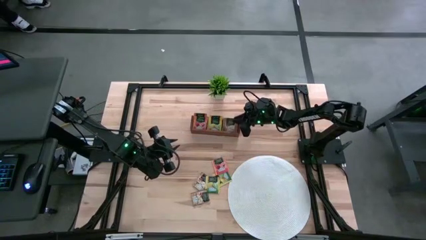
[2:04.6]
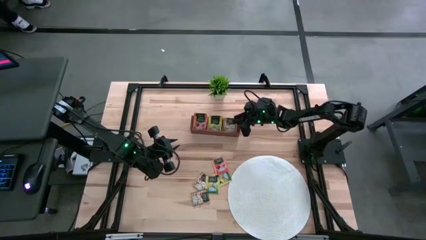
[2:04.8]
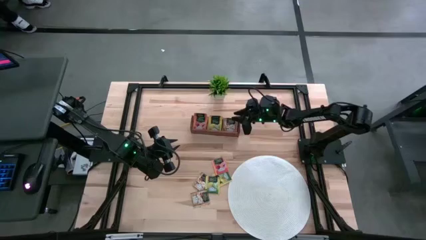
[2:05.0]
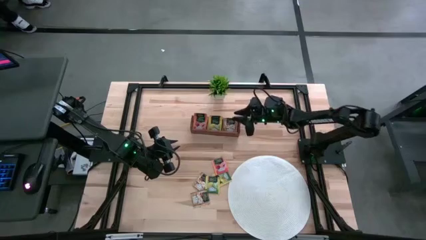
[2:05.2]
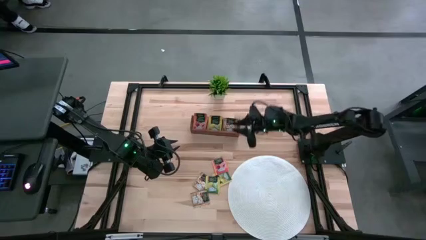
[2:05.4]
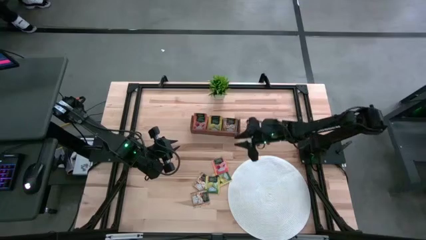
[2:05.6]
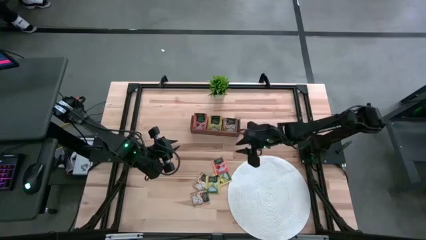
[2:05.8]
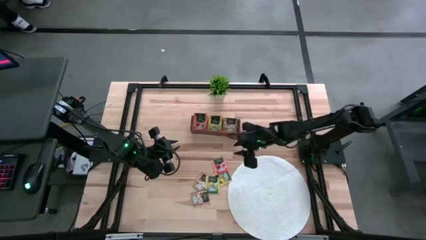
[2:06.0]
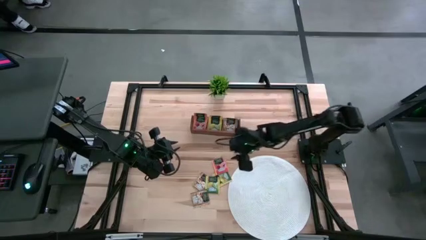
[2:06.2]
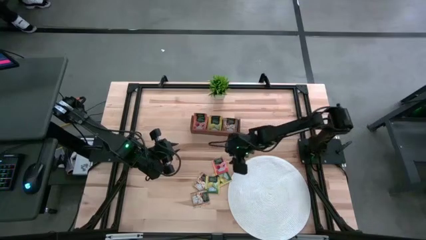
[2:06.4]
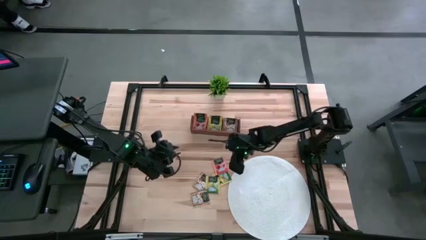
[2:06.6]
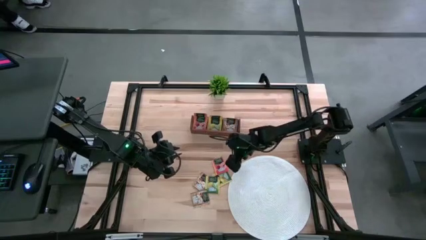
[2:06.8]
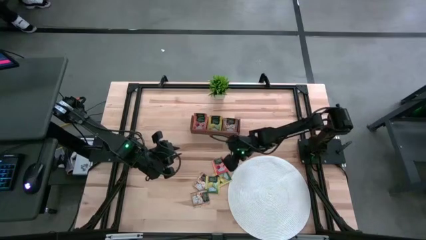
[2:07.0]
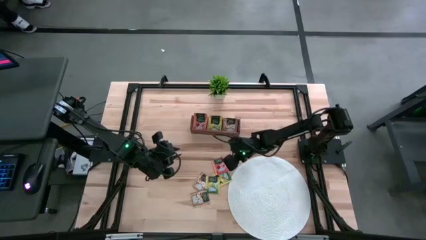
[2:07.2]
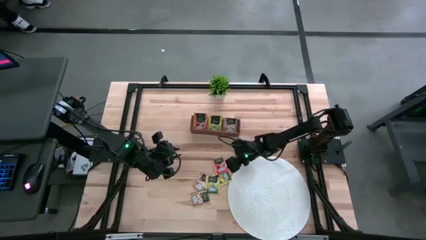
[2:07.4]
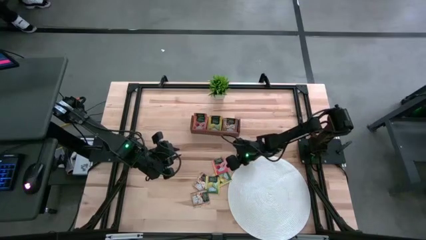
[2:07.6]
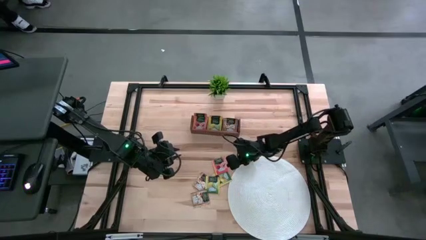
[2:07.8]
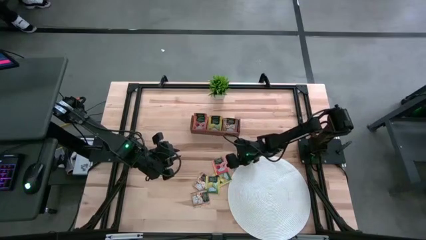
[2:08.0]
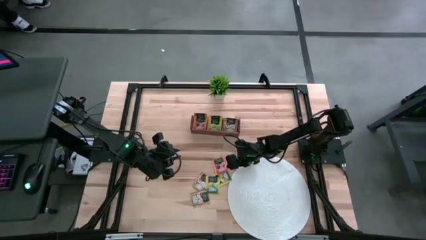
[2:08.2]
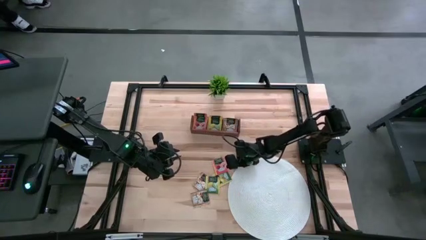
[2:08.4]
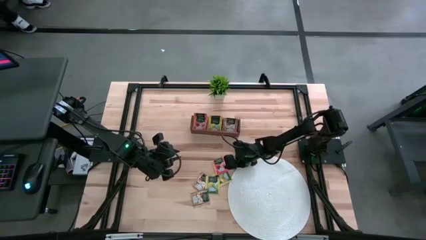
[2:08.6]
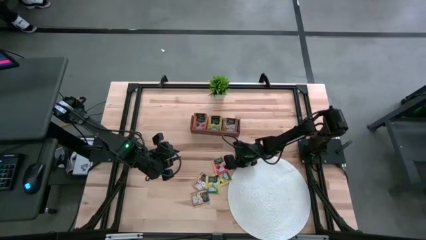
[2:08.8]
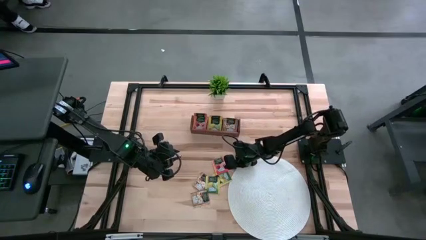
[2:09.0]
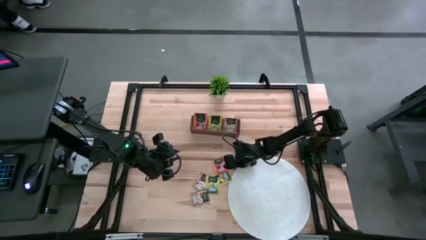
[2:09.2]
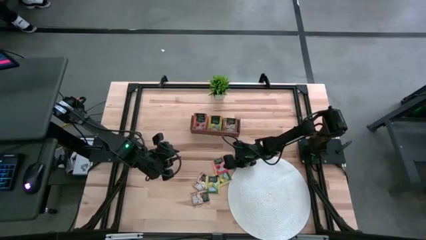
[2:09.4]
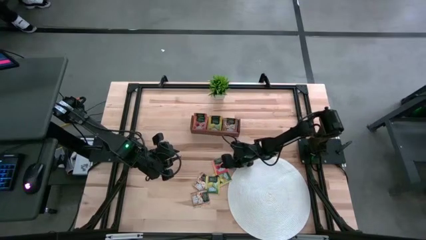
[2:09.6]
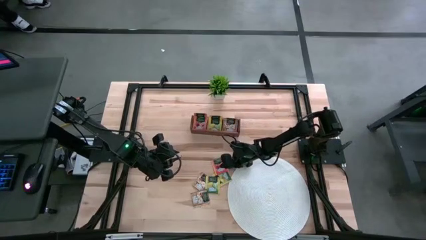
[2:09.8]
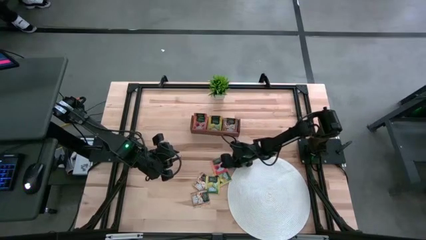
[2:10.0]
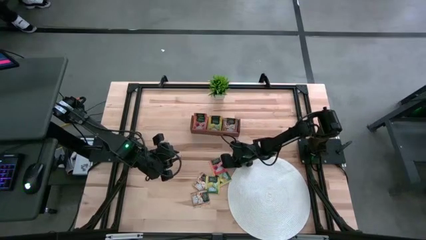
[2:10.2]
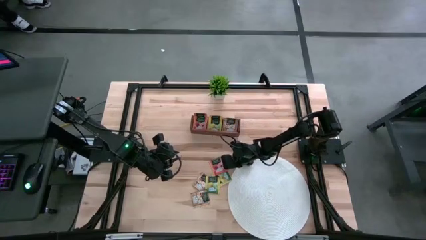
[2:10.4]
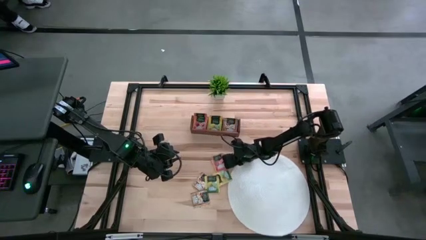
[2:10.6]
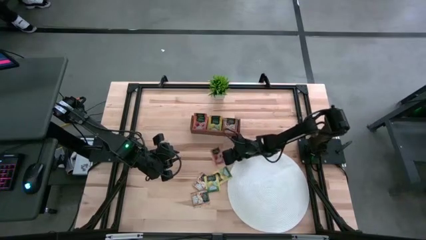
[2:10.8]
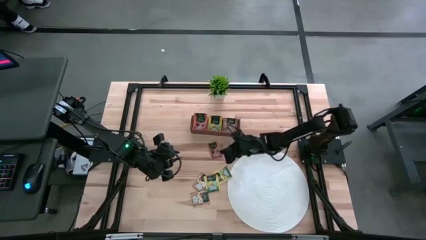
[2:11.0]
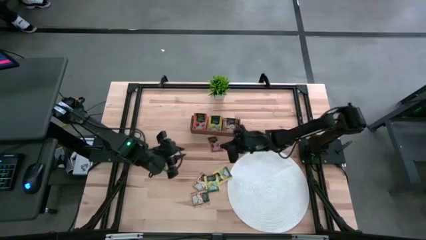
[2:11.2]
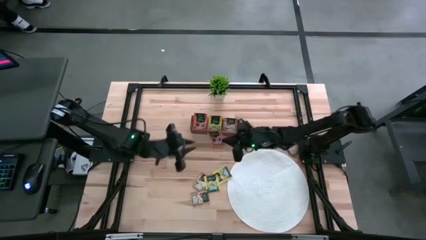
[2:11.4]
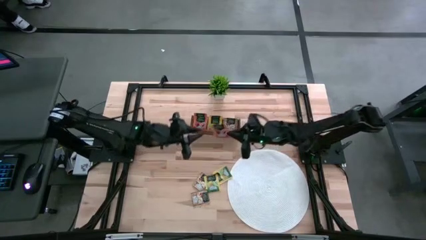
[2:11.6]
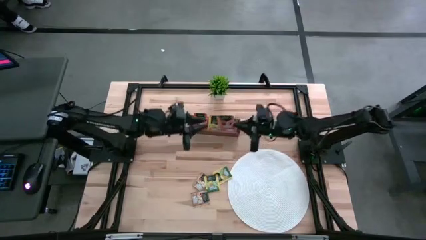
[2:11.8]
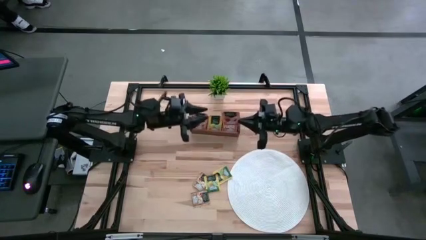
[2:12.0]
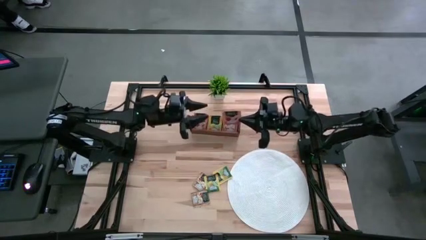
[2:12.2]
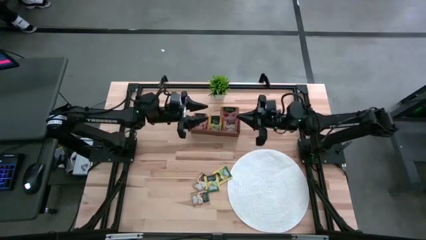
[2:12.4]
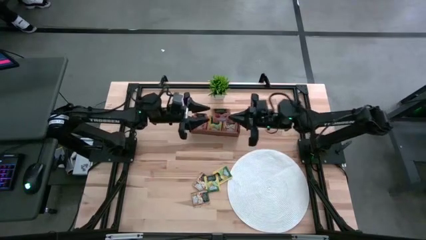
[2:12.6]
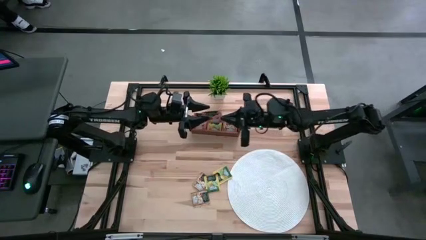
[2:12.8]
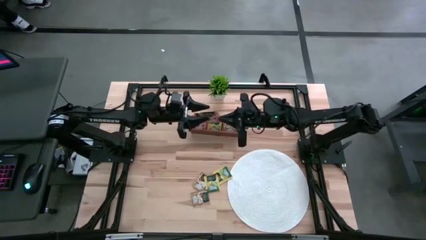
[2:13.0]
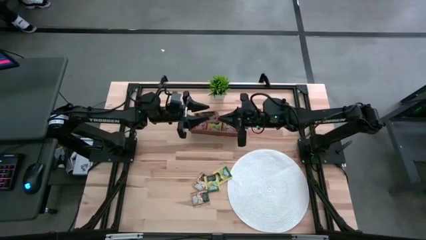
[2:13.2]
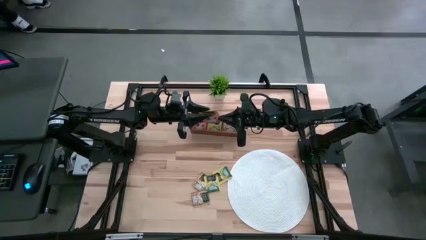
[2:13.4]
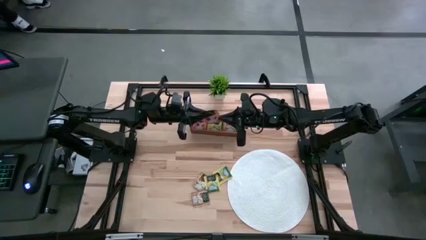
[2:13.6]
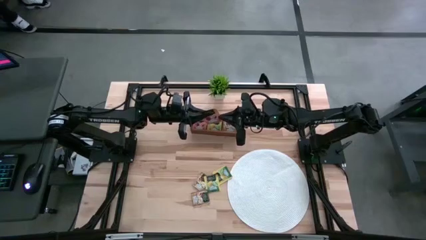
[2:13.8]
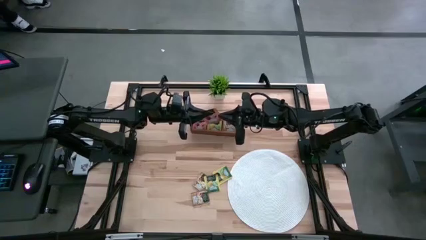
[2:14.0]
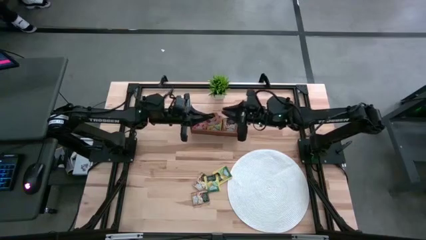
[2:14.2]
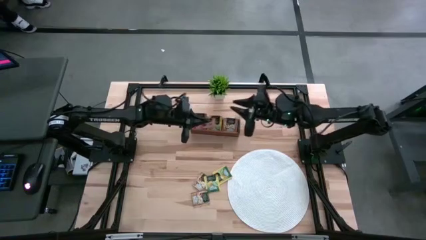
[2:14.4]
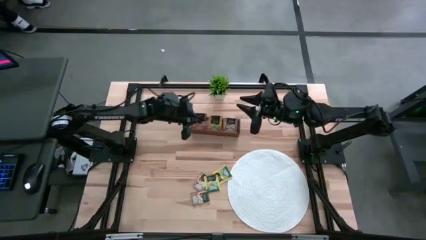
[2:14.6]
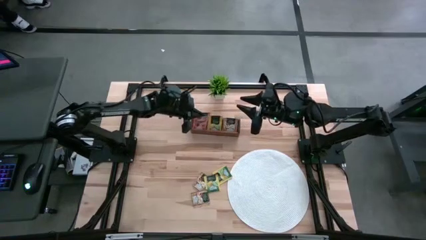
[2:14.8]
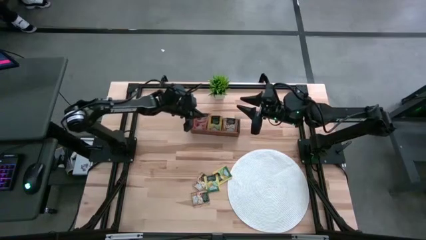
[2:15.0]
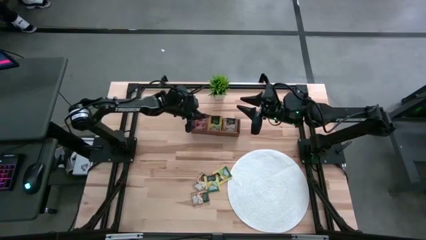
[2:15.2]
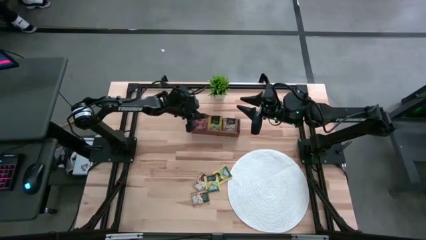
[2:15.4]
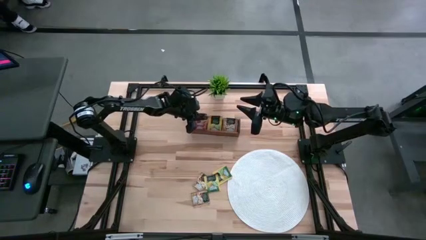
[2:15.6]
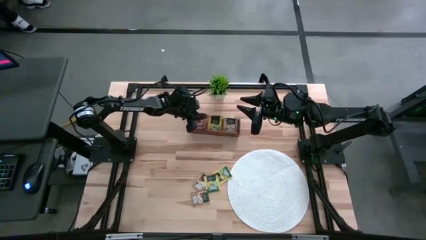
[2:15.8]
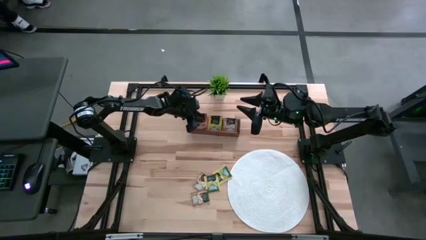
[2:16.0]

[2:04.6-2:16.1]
Task: Pick & Place Tea
Put the orange tea bag into the left section of the wooden organizer
